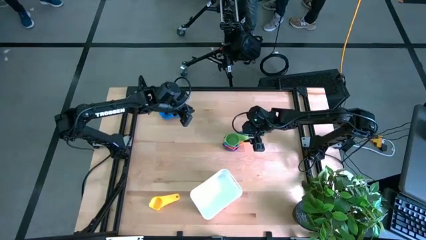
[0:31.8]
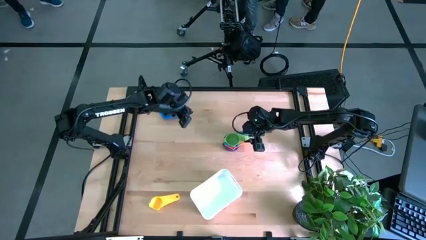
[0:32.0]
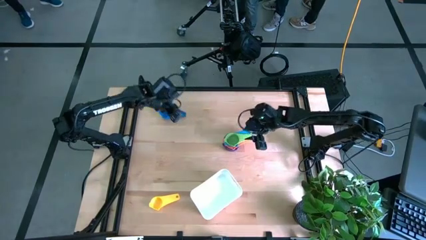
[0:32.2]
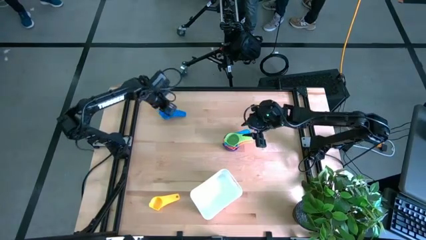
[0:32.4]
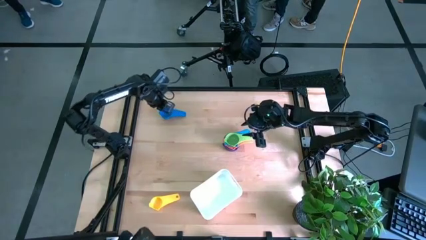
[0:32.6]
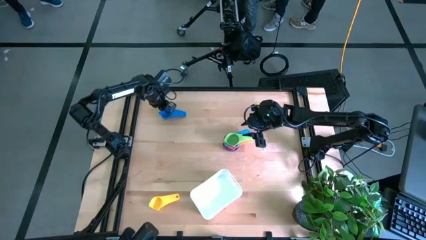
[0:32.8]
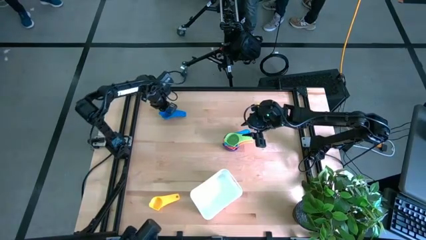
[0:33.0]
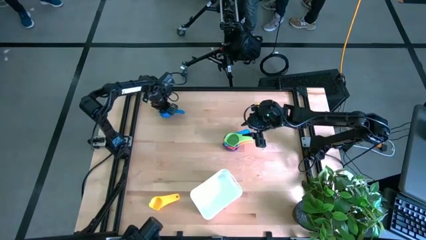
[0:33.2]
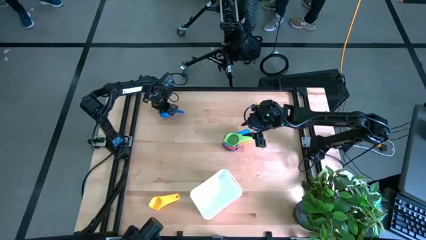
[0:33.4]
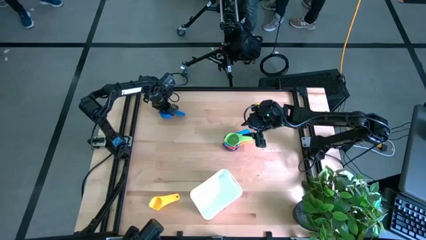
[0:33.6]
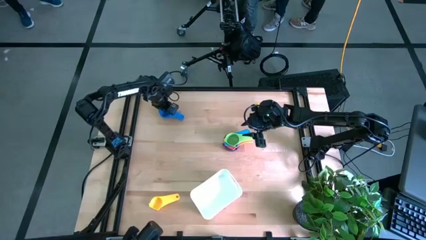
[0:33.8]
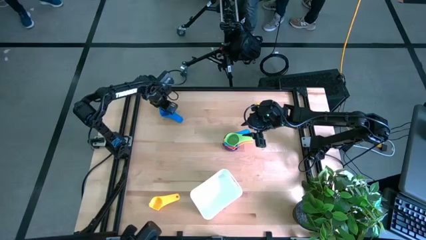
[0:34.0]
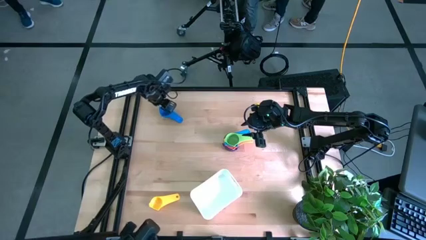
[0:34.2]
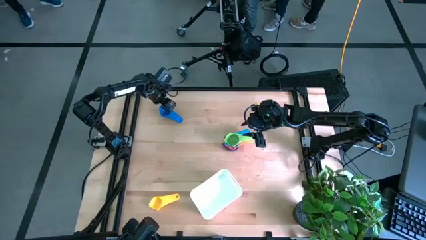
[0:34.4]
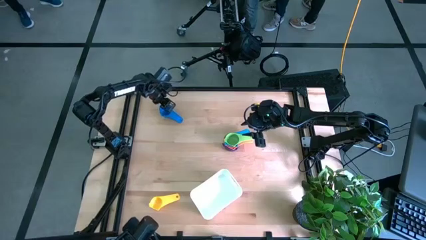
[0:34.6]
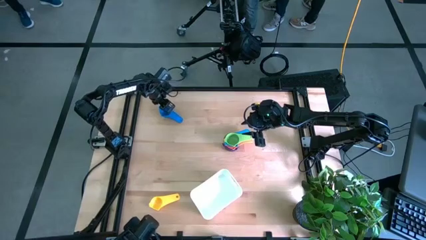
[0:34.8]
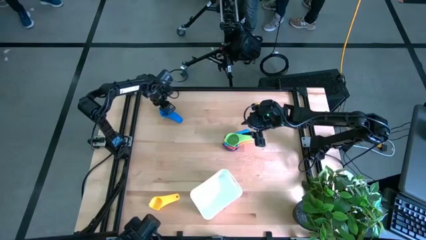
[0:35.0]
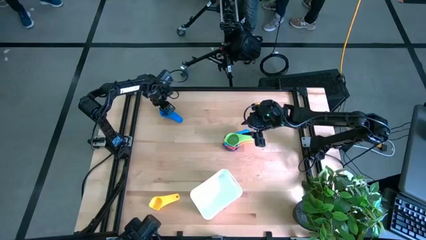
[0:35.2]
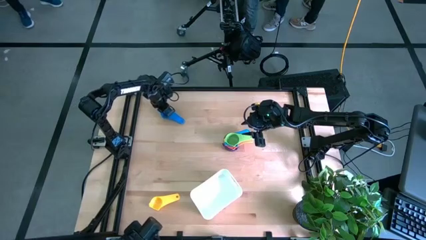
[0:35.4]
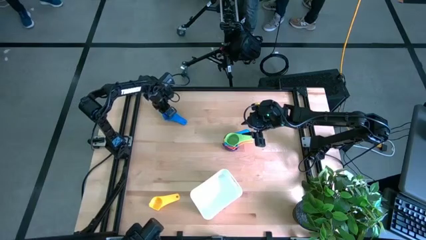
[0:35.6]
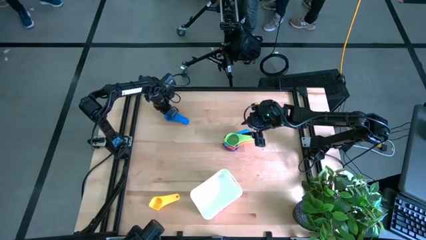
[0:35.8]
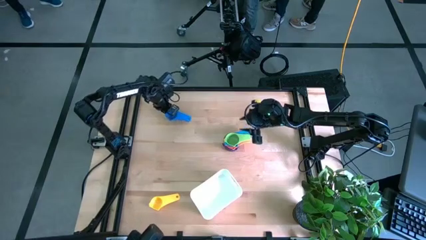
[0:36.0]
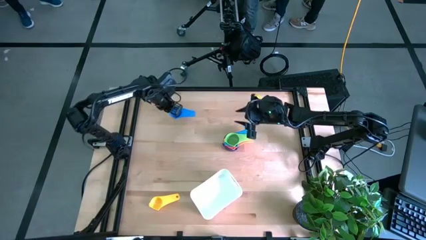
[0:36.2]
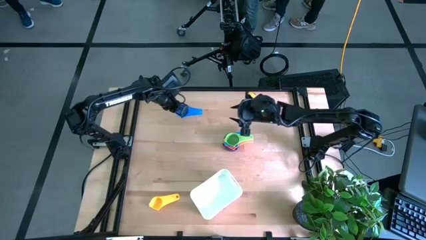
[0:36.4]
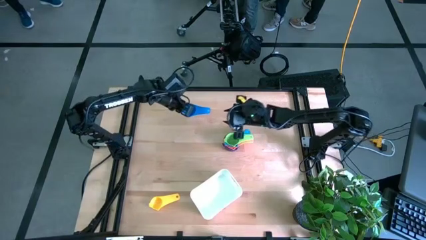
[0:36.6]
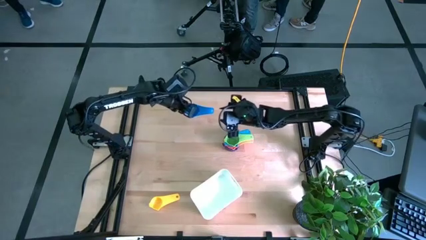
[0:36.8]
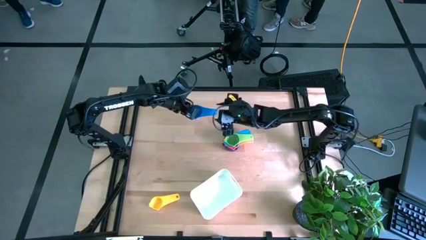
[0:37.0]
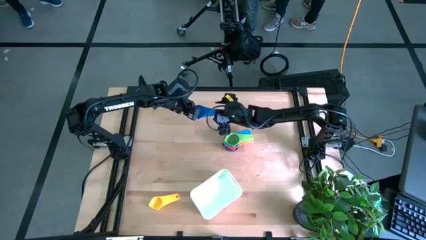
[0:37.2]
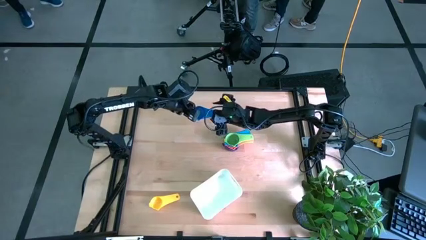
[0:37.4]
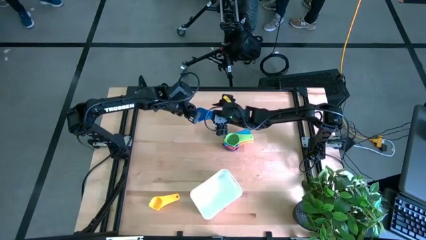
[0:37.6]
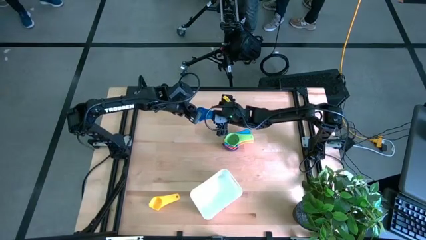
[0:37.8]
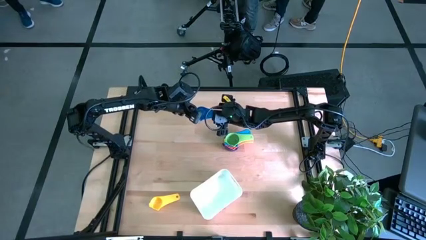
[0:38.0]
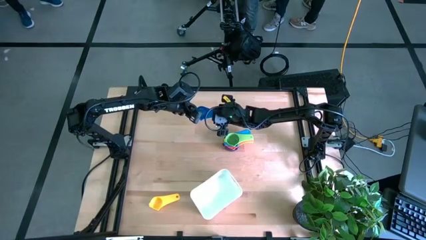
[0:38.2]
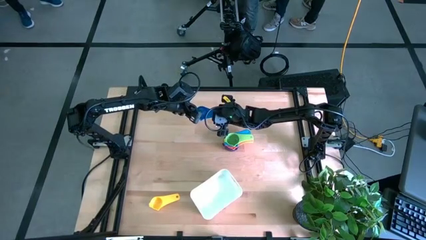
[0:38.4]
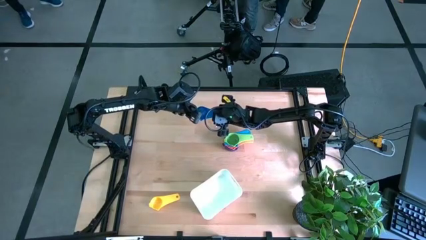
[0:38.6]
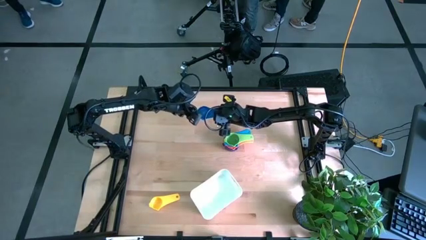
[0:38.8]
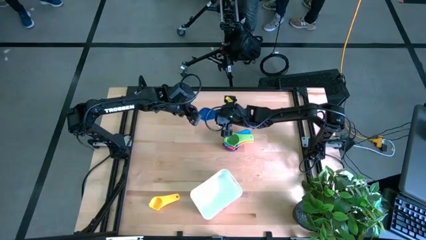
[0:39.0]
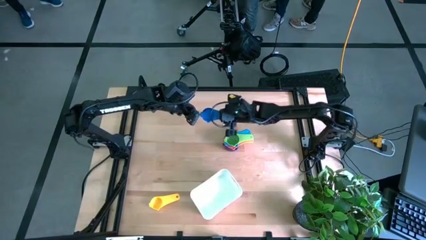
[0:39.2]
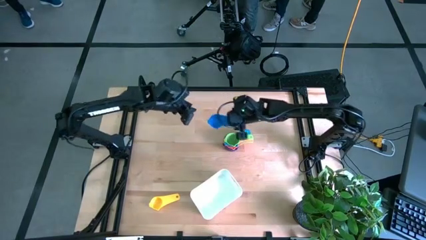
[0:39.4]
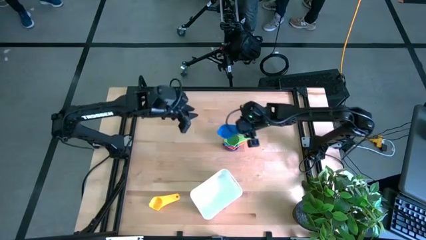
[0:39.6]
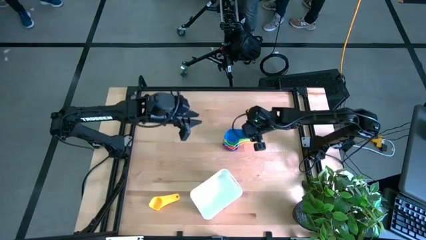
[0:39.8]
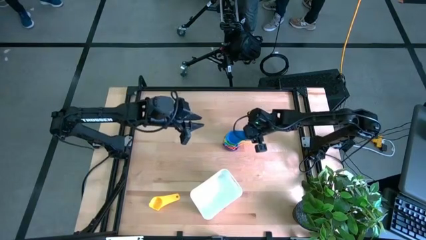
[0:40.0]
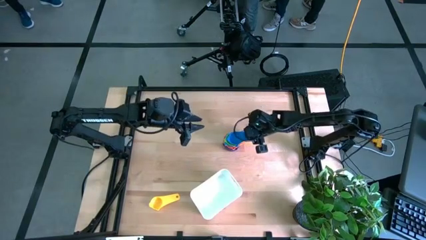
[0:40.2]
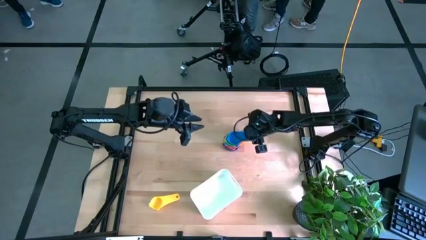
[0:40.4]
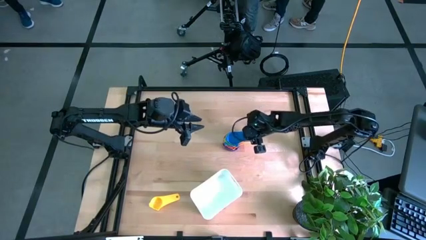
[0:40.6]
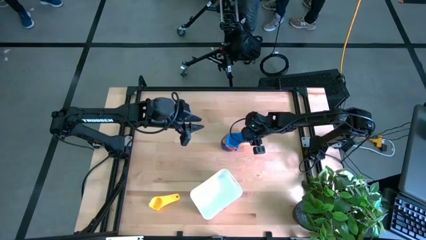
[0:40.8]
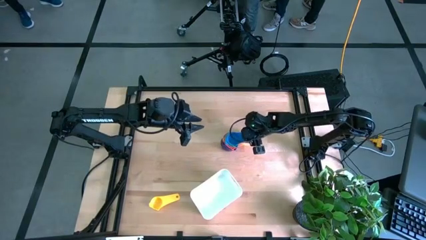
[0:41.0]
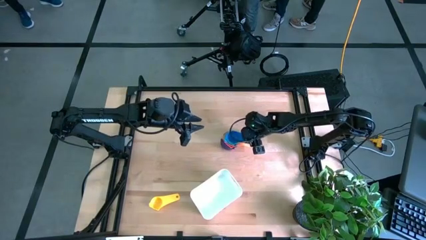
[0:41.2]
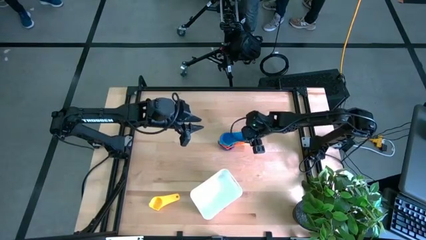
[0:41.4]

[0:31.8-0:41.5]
Task: Nest measuring cups in basket
Stack the blue measuring cup on top of the green measuring cup

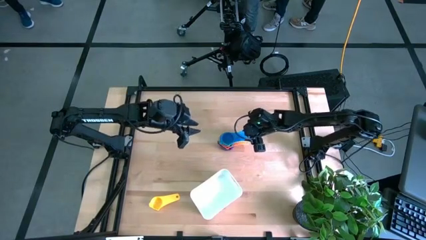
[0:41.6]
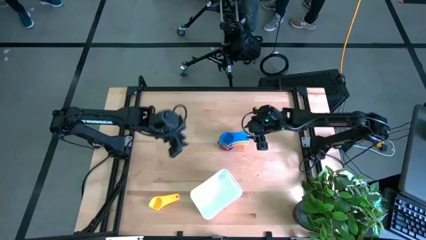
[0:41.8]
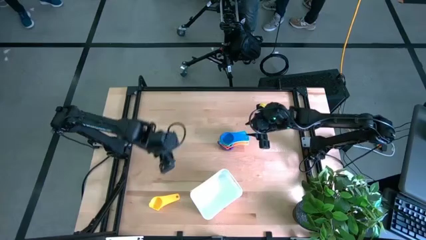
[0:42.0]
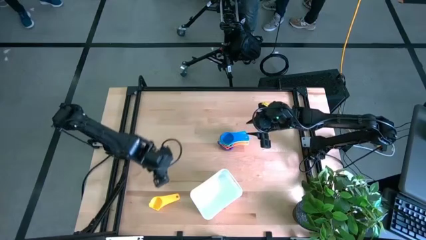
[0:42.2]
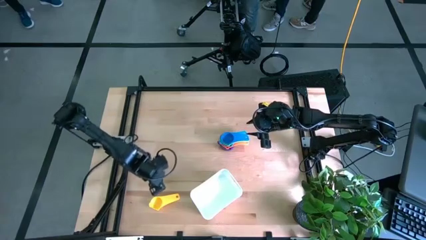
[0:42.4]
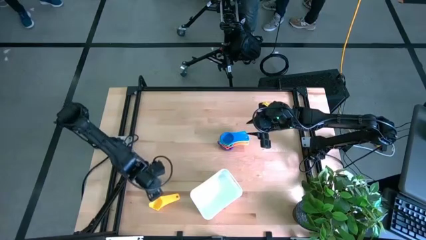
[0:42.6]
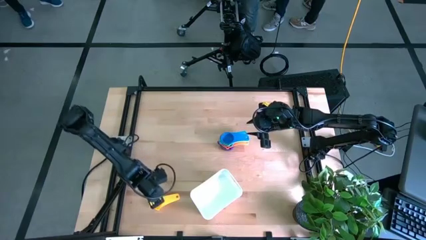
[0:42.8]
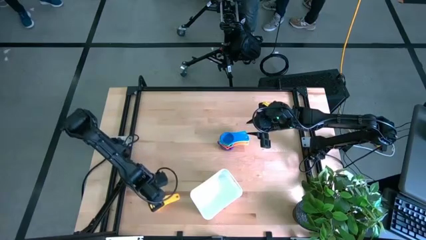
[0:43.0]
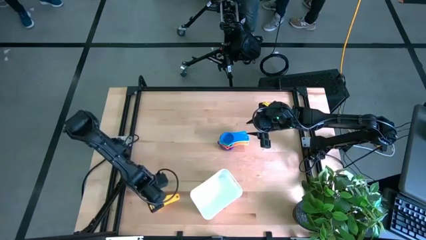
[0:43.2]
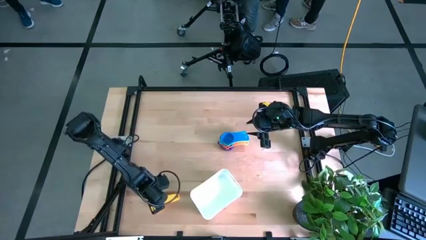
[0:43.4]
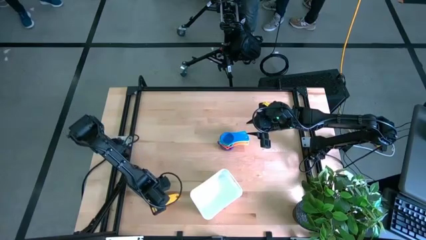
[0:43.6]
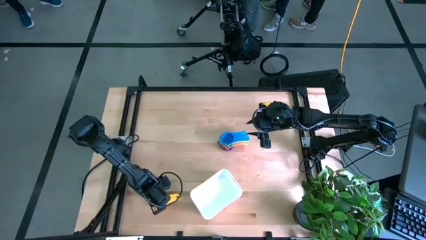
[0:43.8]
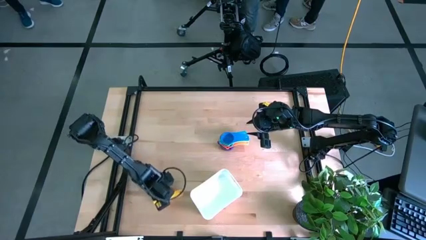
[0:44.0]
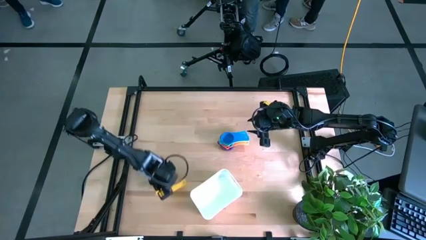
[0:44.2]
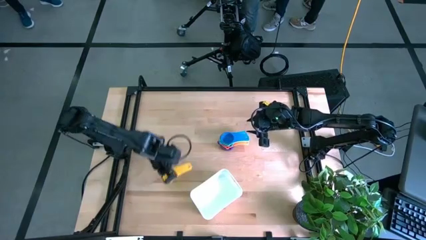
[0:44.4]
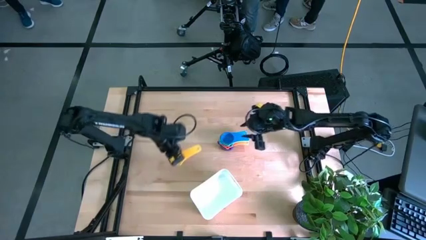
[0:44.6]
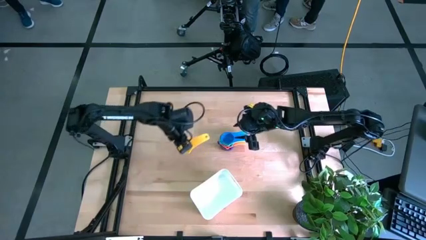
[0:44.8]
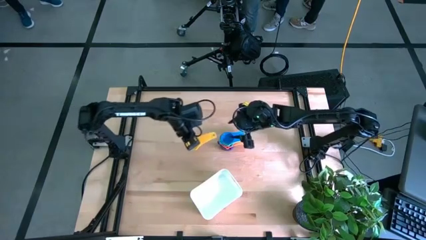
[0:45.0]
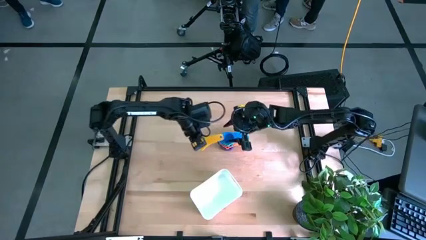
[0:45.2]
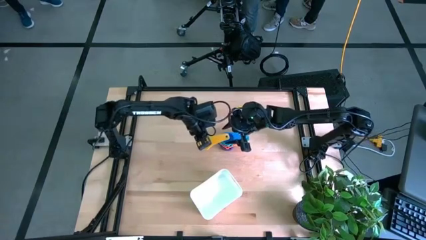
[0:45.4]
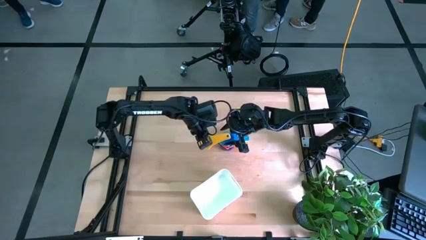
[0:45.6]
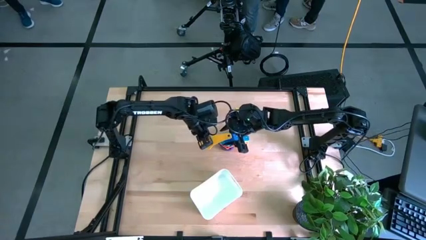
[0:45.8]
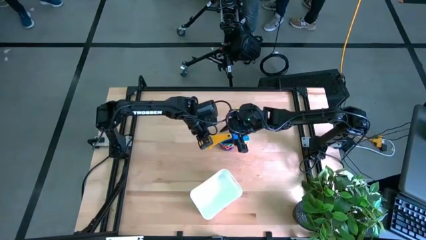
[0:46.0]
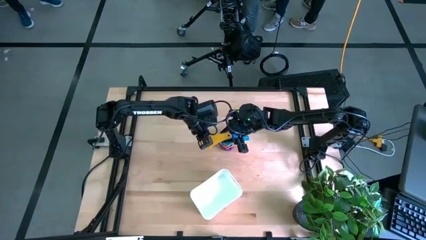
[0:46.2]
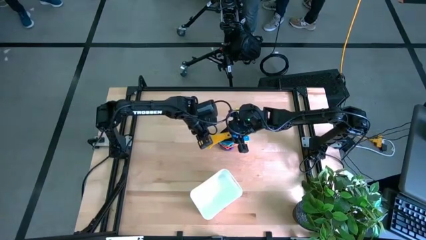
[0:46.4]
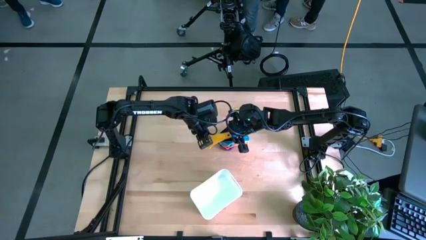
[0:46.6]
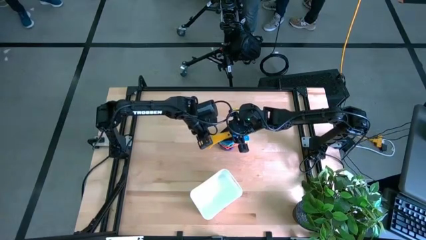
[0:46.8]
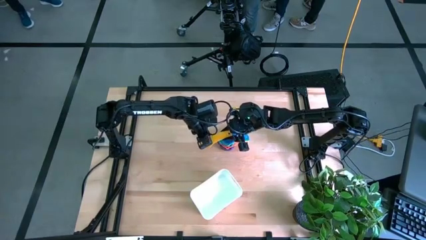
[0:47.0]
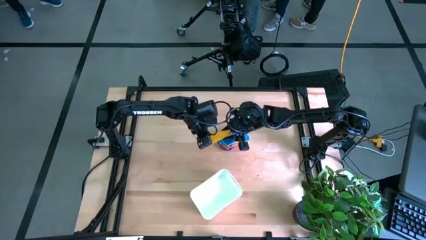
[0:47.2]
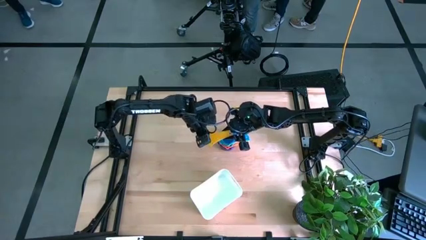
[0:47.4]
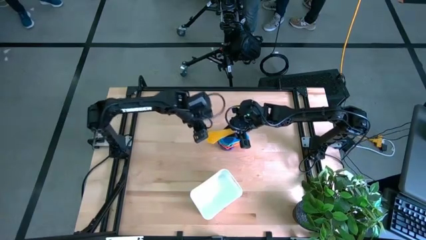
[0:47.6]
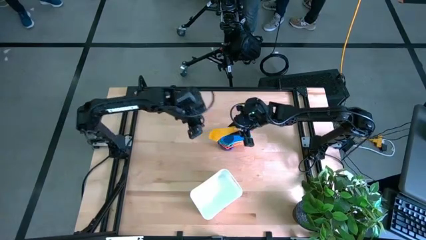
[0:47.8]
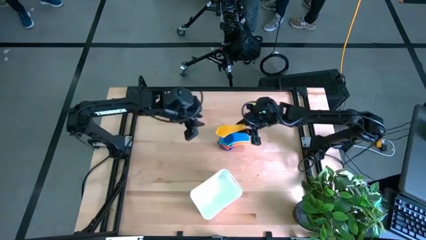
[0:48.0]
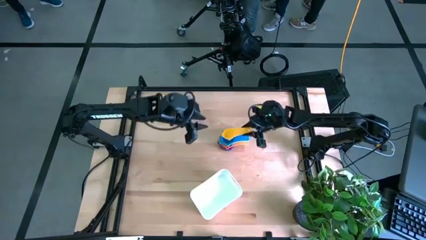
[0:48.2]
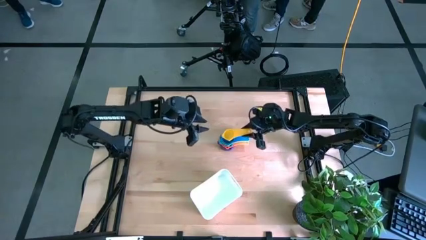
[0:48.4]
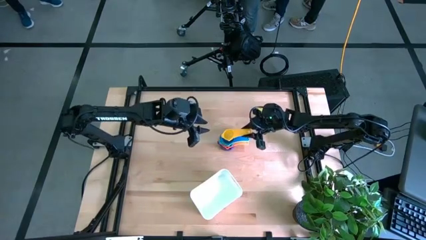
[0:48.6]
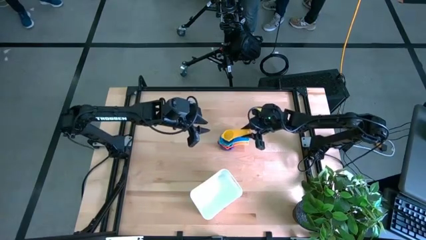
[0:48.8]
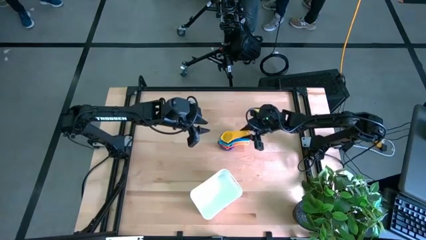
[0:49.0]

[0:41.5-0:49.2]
Stack the yellow measuring cup on top of the blue measuring cup
